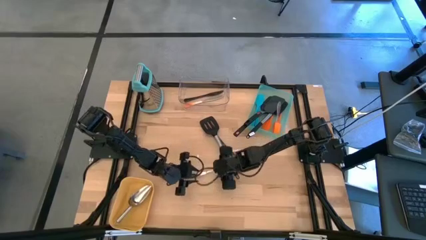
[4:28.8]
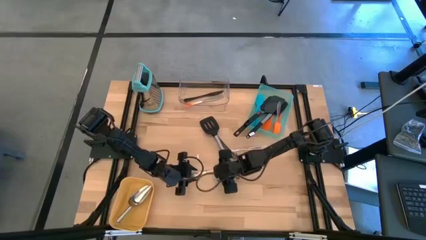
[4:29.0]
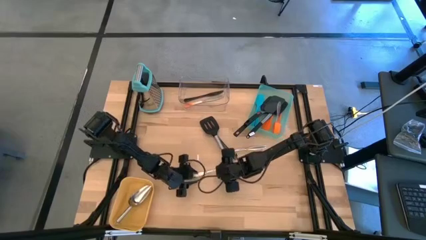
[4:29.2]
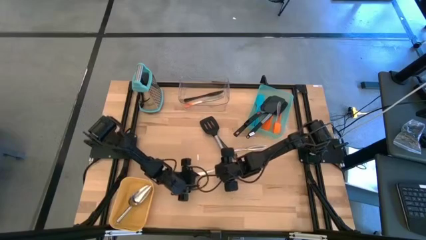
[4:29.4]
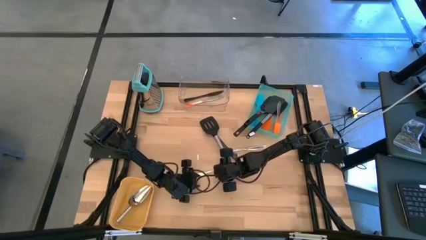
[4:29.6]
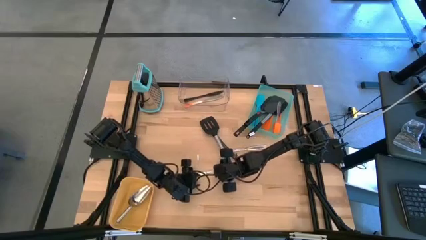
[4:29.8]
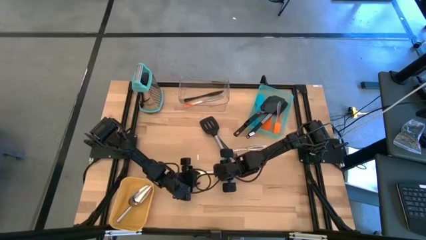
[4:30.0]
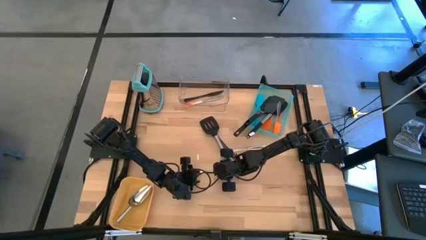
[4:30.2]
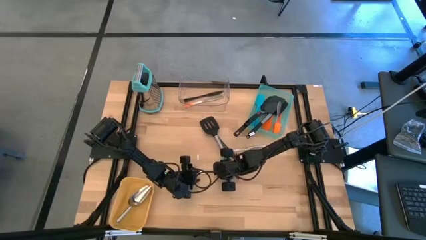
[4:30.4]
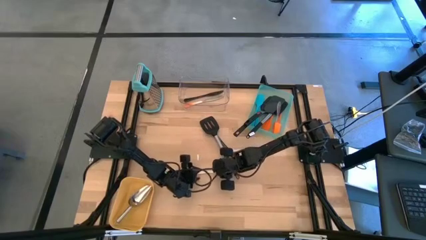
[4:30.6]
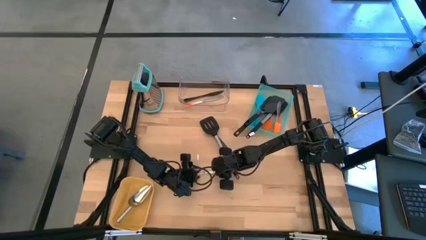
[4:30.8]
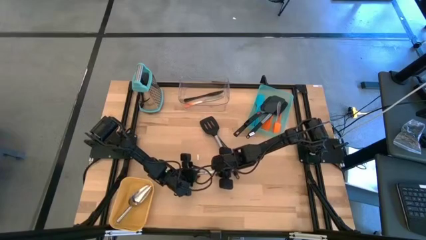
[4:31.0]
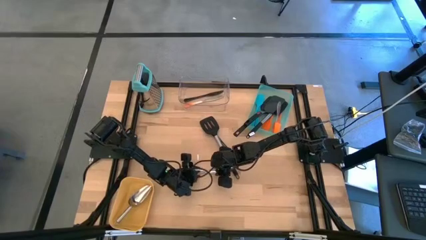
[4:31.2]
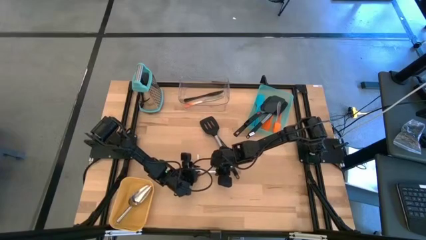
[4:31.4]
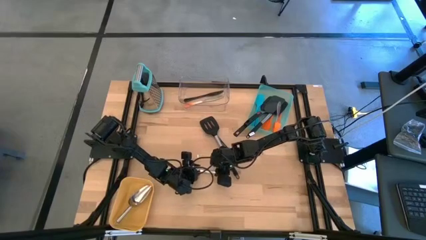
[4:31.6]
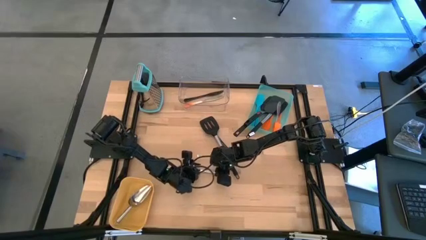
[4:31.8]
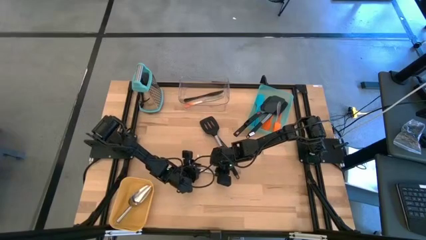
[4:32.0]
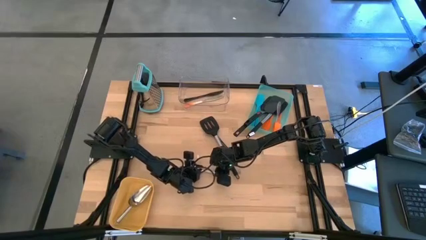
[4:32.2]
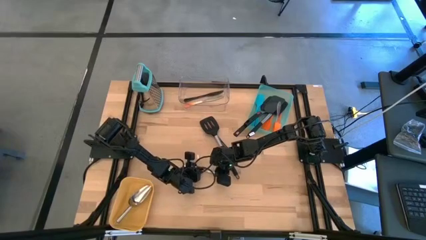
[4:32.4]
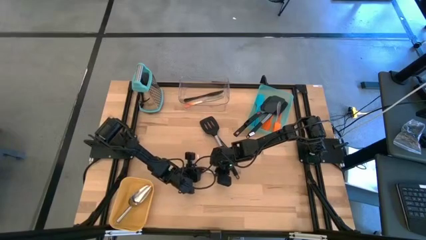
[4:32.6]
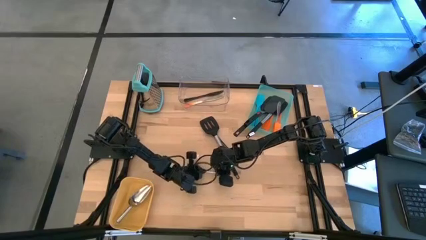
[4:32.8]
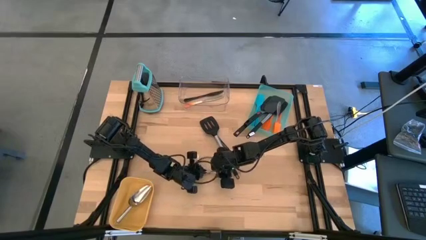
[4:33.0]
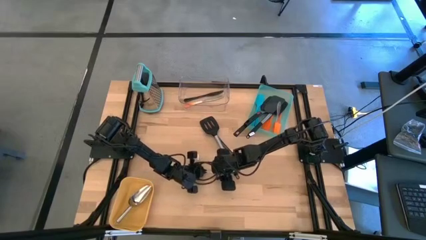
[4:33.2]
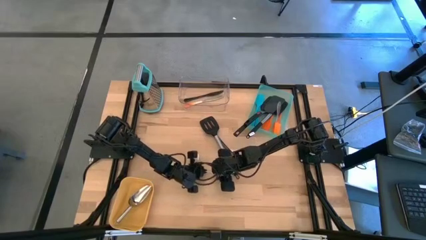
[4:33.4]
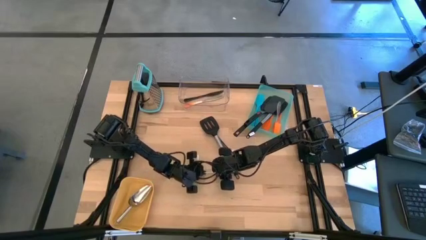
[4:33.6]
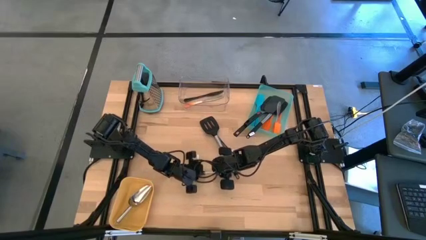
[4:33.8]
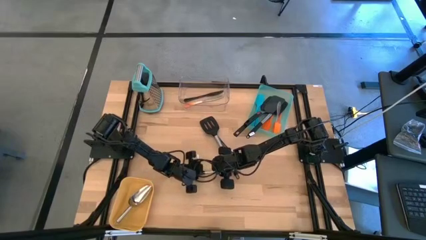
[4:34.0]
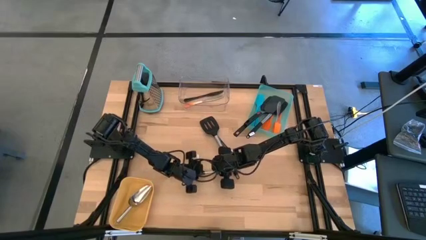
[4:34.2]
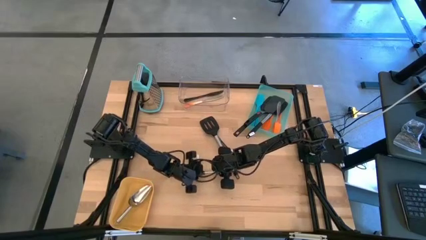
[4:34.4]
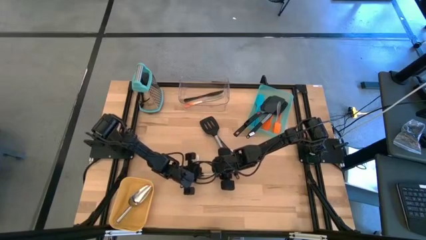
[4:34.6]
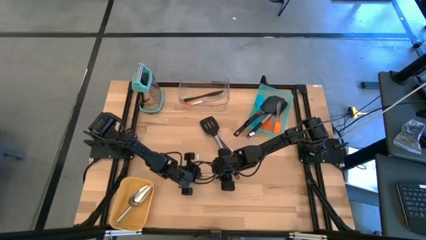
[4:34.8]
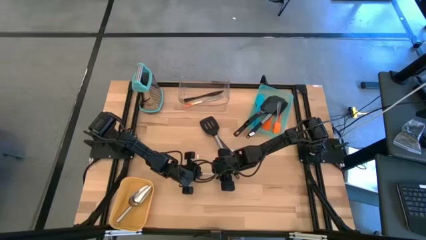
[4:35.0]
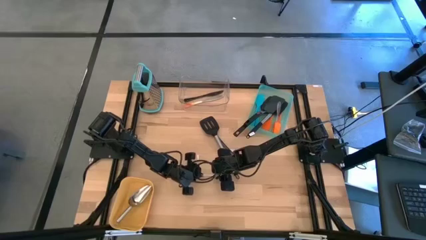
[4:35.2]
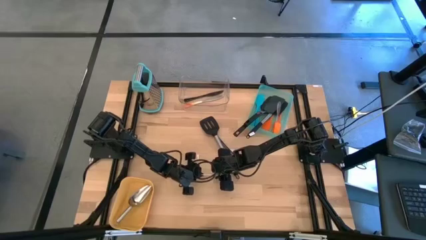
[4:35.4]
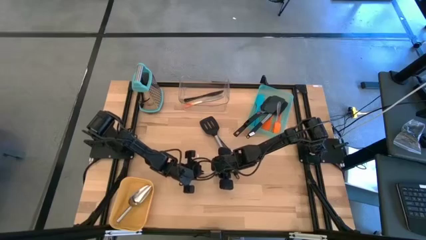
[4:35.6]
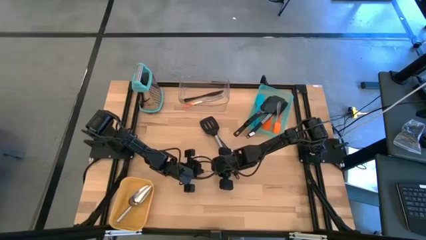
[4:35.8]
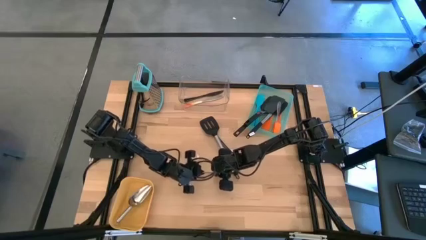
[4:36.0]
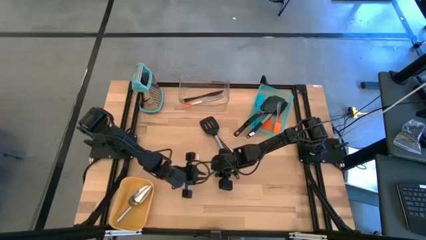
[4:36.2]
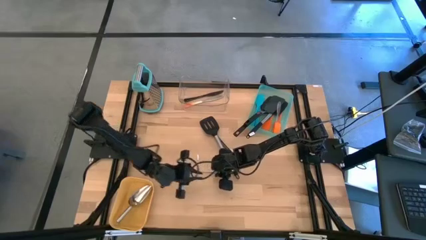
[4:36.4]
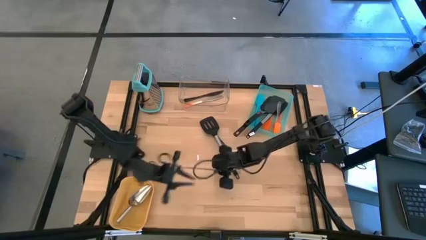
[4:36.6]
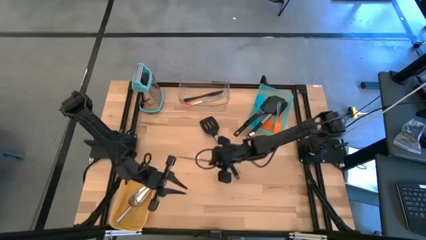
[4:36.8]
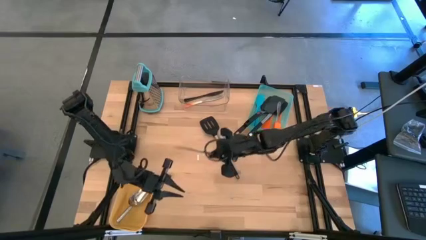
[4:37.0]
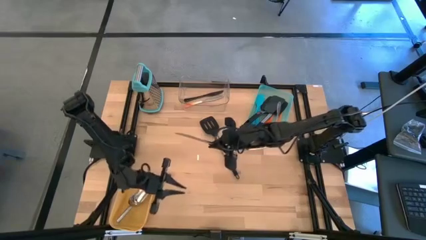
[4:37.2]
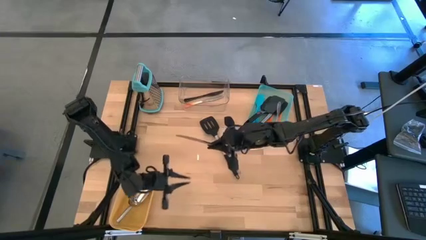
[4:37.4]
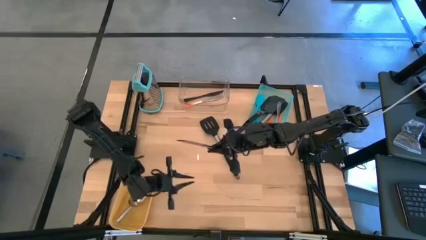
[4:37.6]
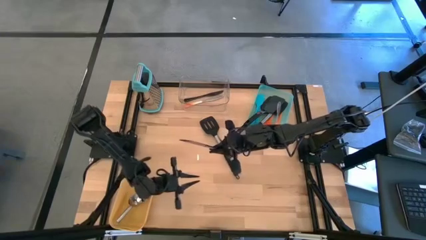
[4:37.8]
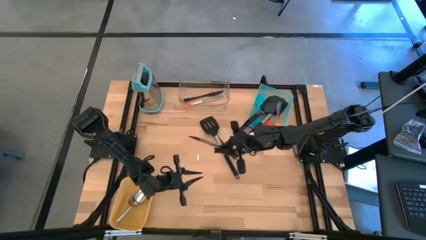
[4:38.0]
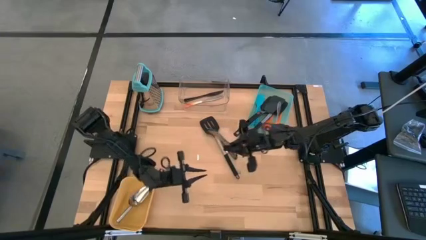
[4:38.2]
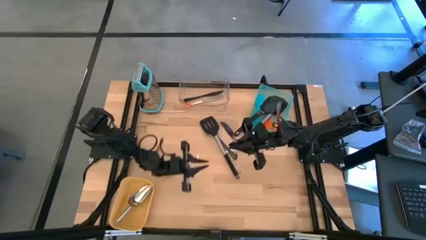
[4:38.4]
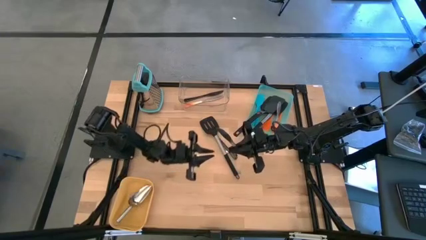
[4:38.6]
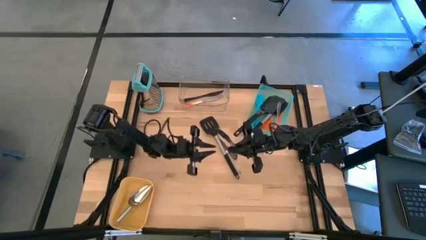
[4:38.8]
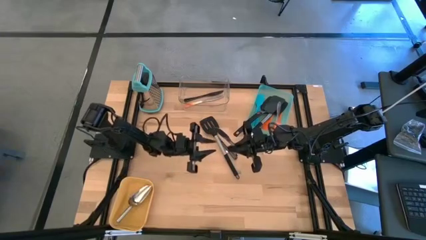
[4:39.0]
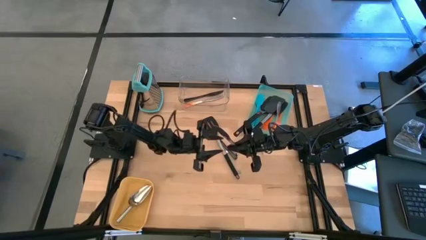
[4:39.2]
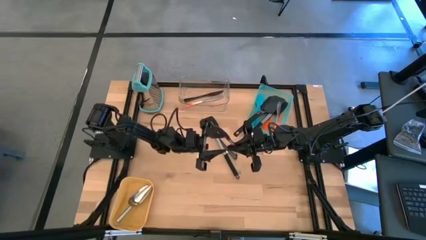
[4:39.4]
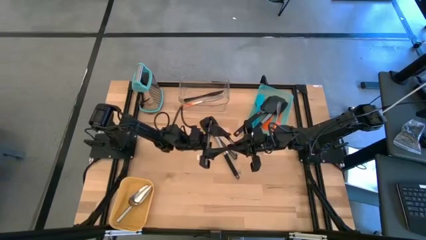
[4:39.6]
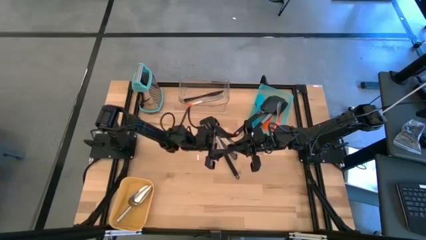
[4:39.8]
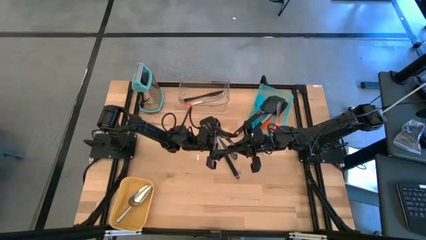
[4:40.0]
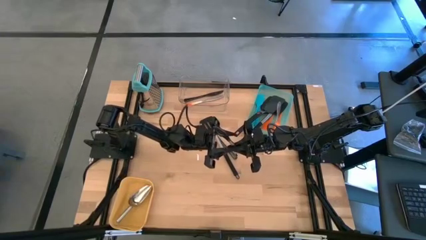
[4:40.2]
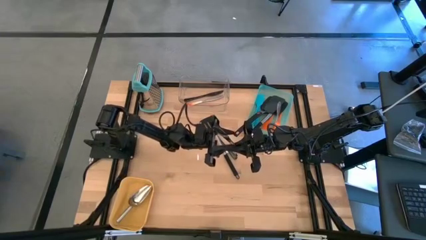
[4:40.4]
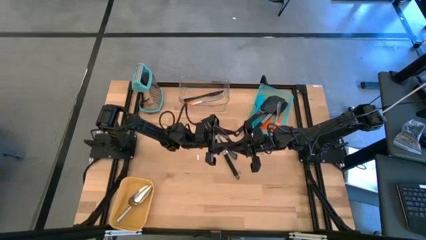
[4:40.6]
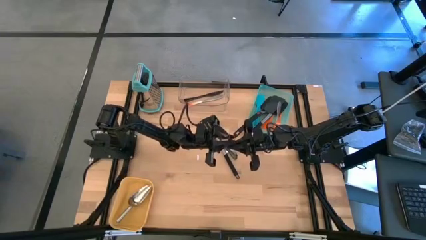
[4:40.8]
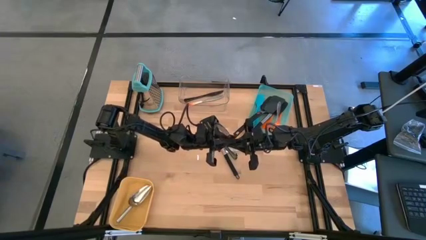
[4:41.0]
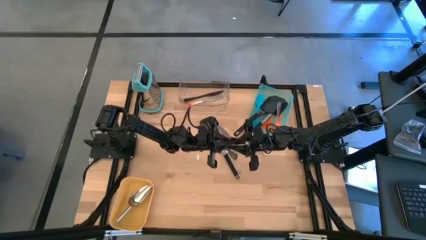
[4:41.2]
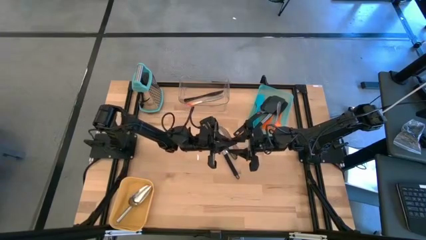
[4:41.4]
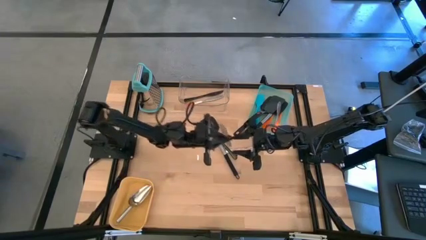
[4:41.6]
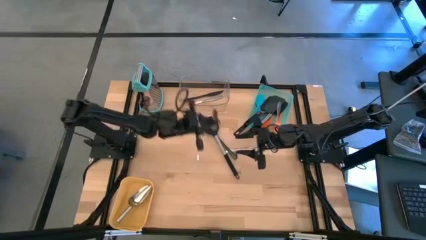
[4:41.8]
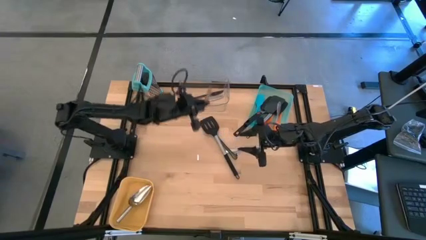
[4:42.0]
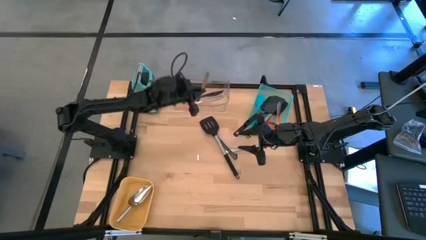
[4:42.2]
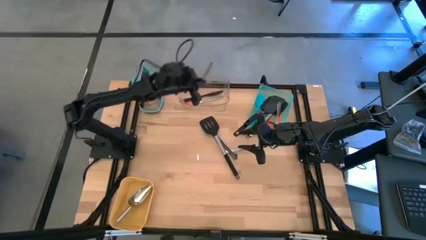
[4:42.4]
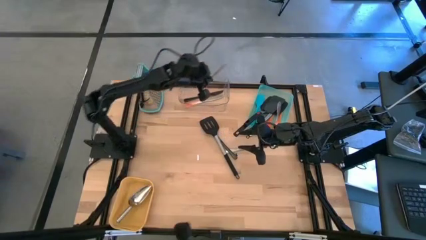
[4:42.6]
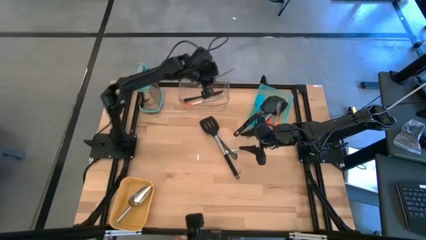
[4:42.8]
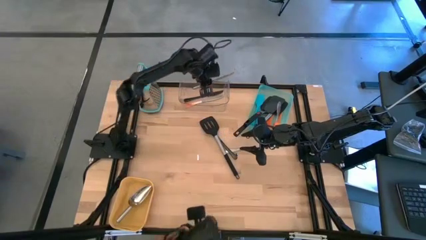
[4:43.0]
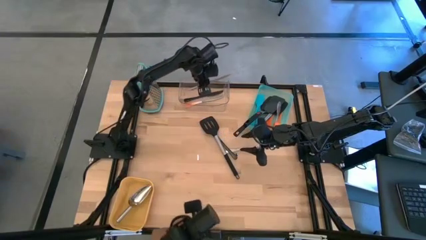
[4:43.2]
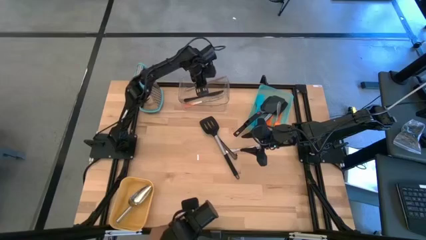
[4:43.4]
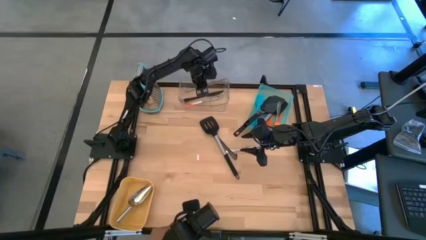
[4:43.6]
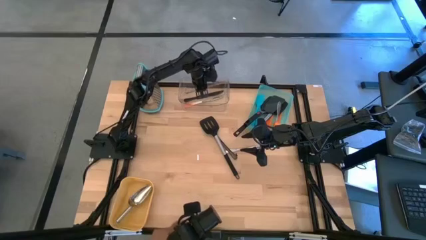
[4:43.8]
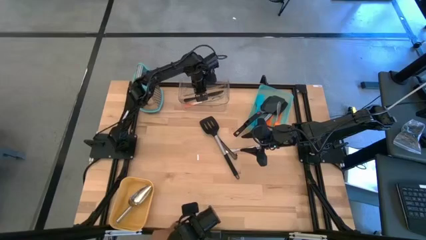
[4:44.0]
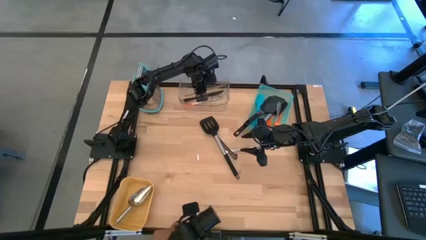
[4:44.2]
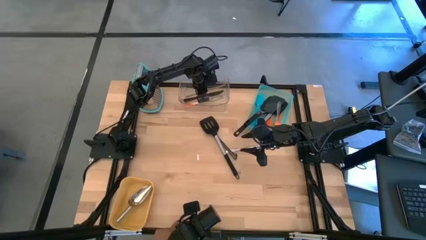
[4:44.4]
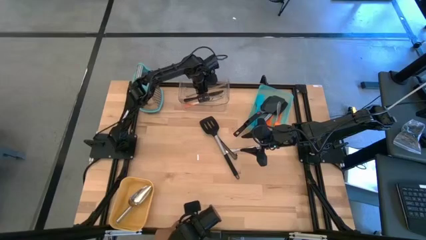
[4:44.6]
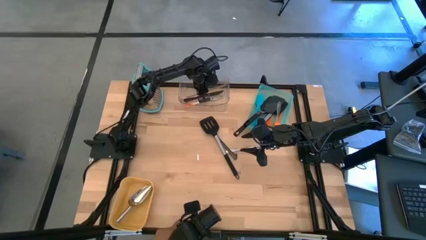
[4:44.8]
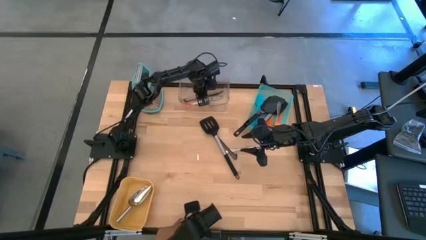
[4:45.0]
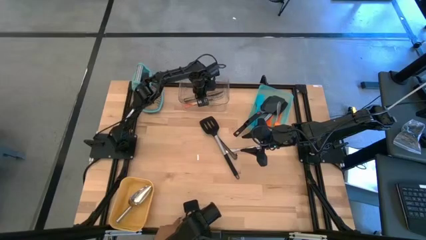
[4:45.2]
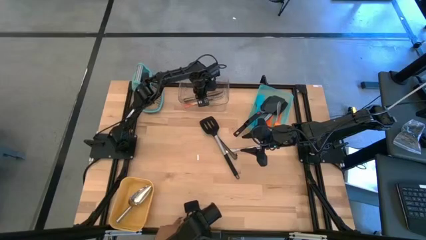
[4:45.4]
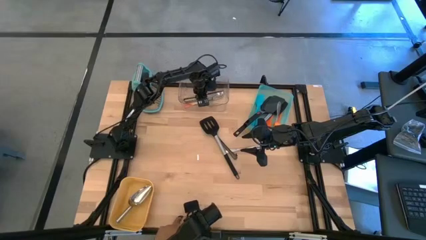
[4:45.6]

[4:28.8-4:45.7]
Task: Pick & Place Kitchen Items
Put the silver table knife into the transparent bin
